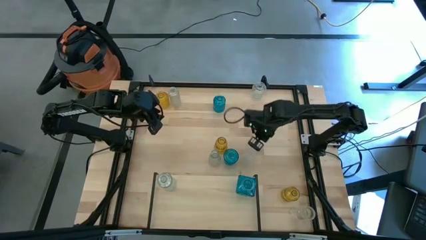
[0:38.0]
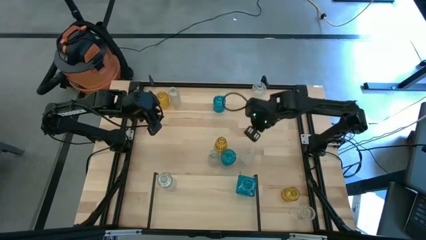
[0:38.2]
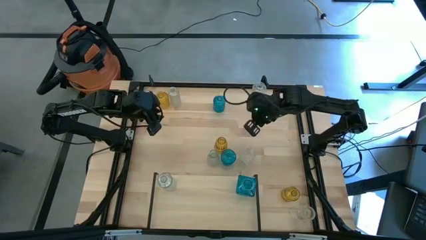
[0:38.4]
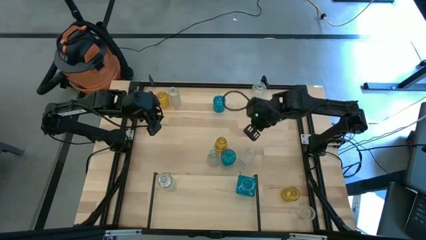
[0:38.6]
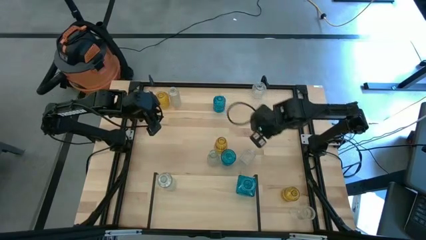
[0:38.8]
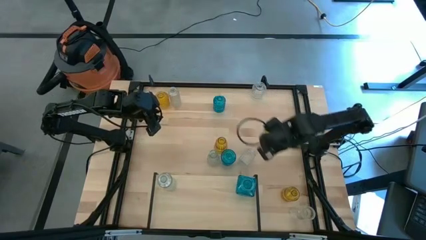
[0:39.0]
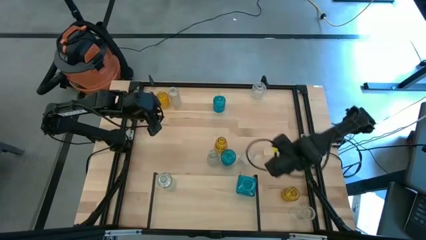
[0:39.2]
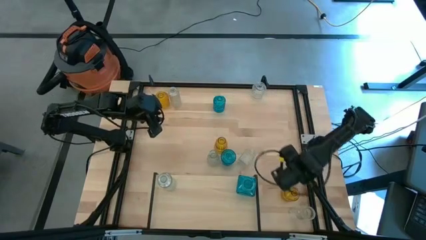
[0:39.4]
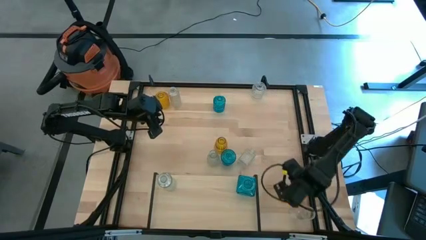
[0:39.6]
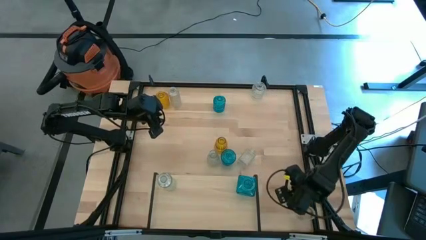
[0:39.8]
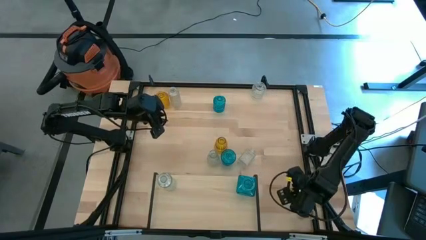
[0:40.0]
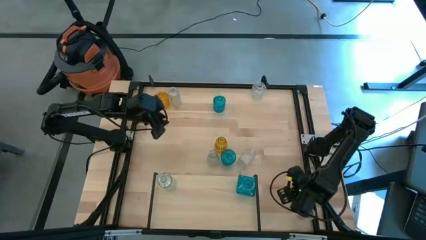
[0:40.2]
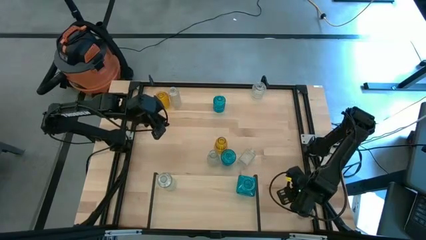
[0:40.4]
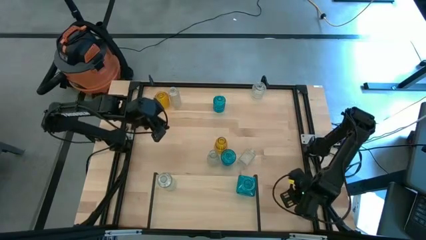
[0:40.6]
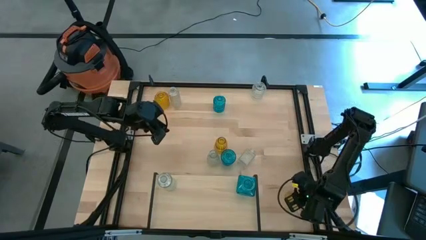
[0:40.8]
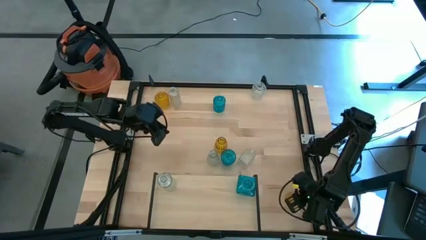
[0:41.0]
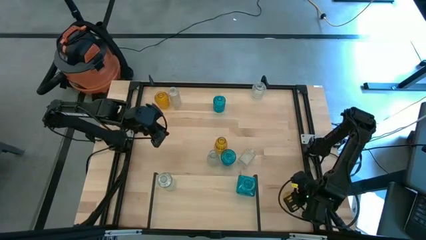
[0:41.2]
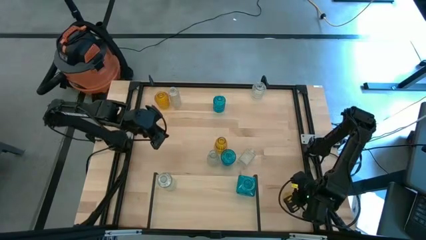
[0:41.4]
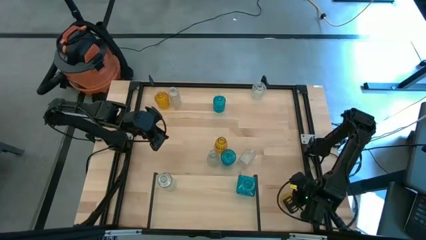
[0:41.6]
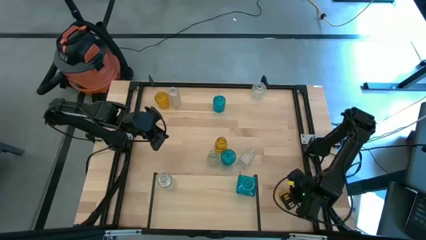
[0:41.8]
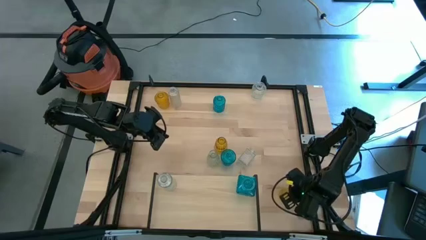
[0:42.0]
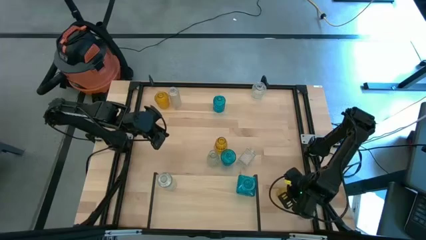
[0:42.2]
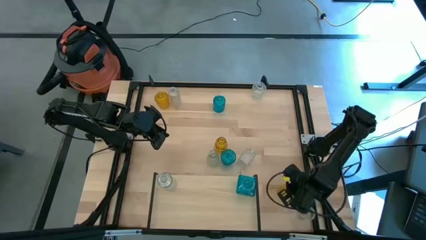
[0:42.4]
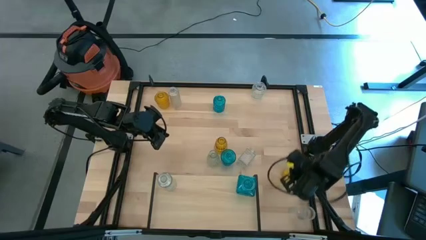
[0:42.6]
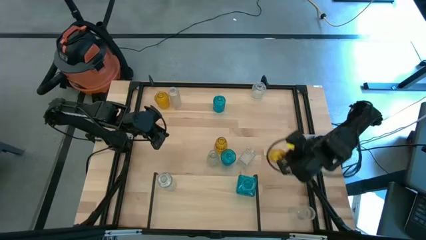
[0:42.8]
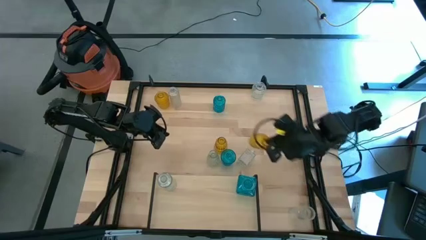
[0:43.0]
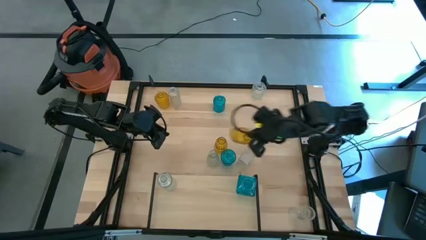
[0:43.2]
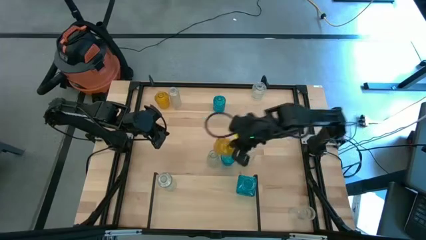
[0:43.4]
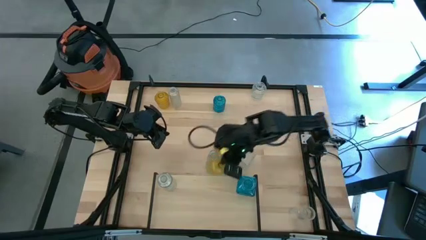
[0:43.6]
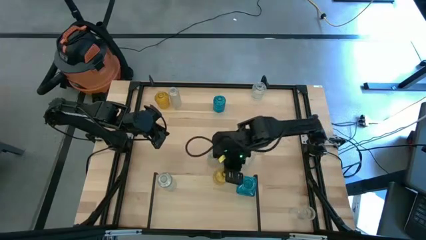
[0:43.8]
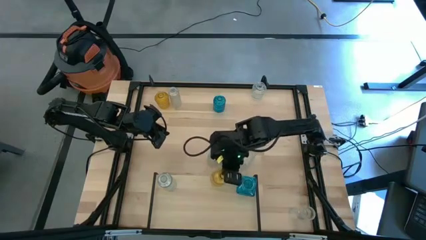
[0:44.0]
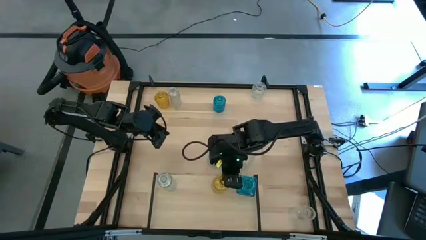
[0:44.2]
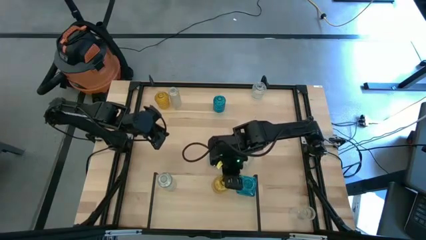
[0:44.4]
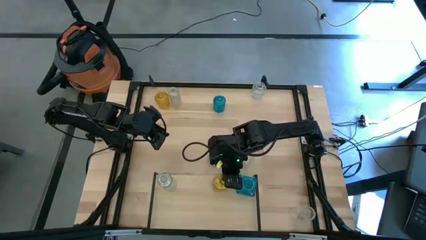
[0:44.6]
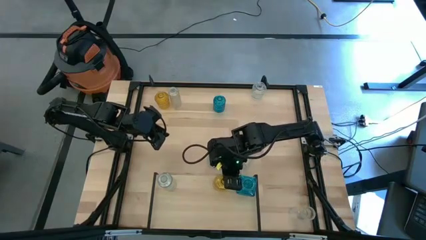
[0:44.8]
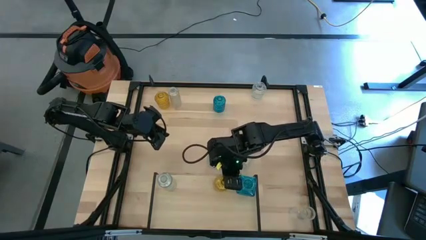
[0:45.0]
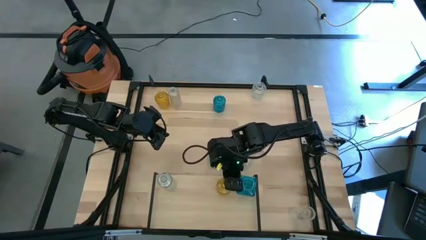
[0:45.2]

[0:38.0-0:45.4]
Task: sort vases onto shelf
Put the yellow vase on the shelf

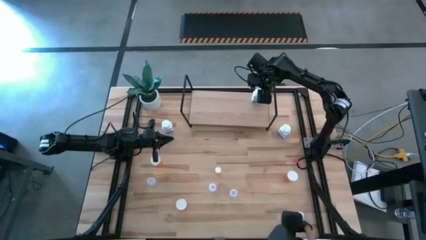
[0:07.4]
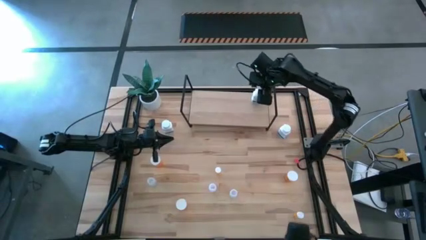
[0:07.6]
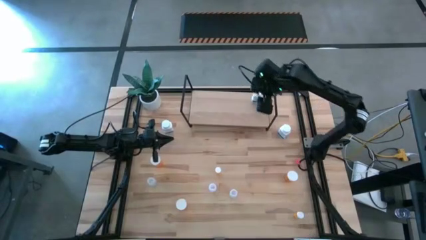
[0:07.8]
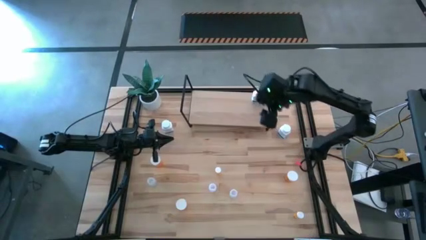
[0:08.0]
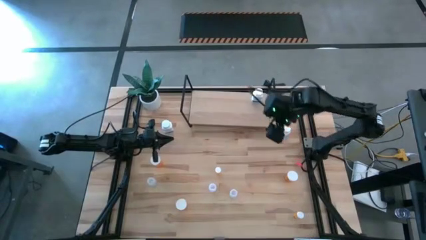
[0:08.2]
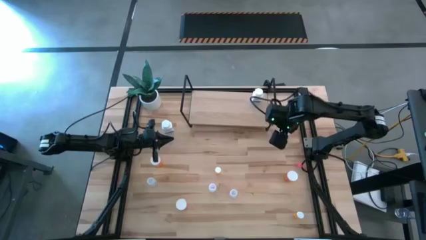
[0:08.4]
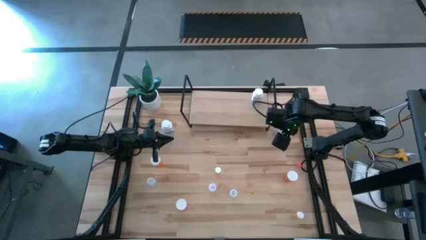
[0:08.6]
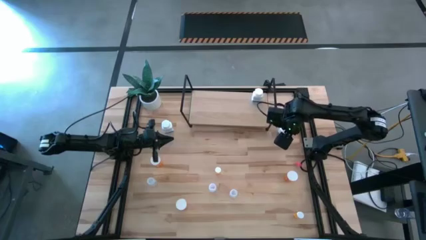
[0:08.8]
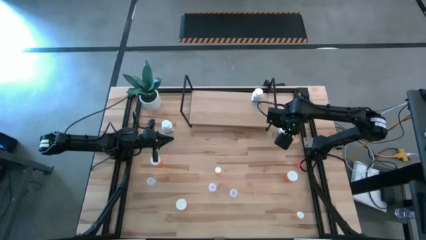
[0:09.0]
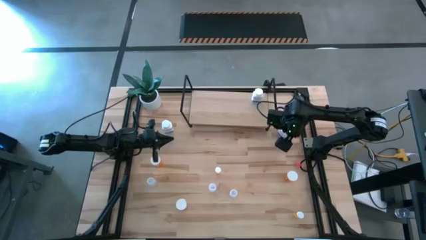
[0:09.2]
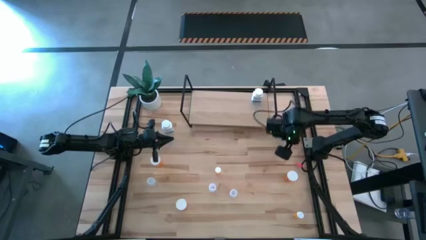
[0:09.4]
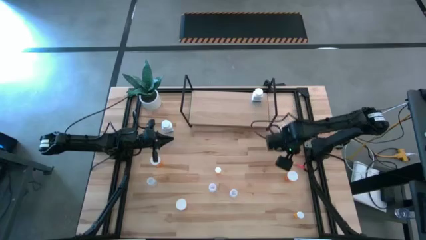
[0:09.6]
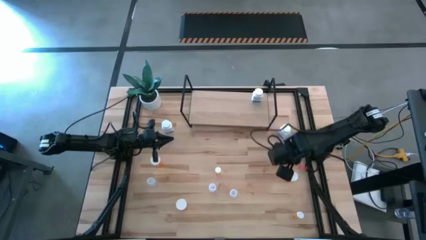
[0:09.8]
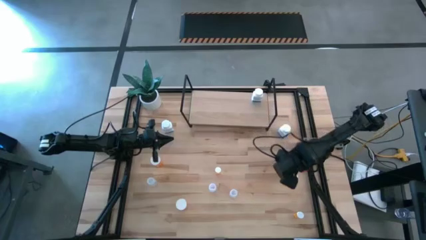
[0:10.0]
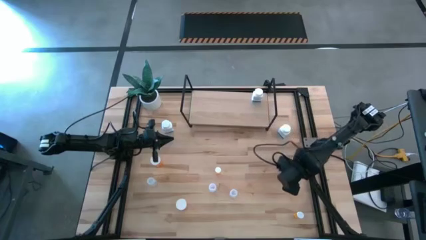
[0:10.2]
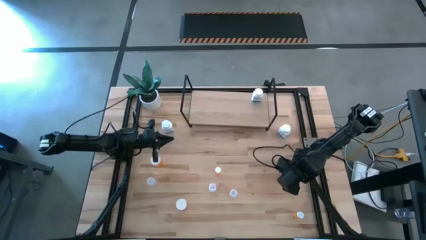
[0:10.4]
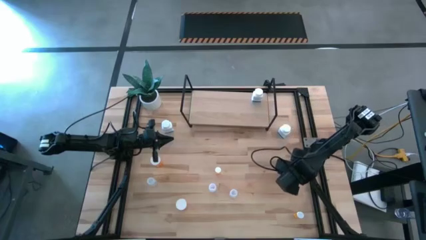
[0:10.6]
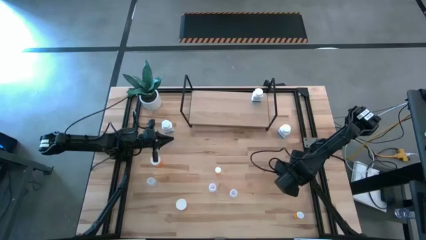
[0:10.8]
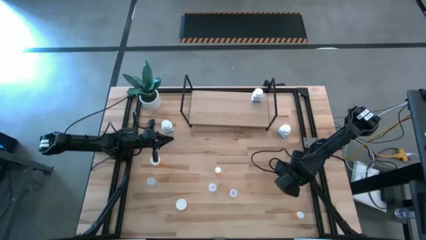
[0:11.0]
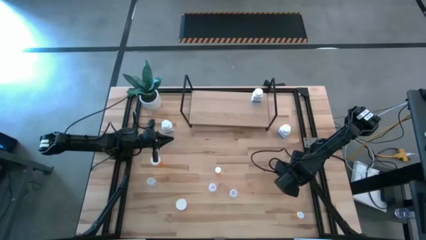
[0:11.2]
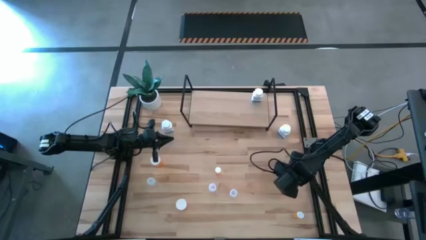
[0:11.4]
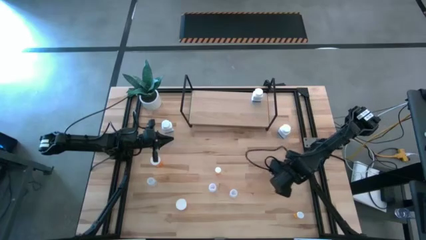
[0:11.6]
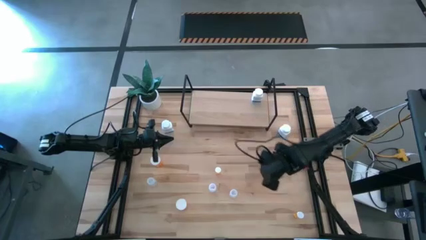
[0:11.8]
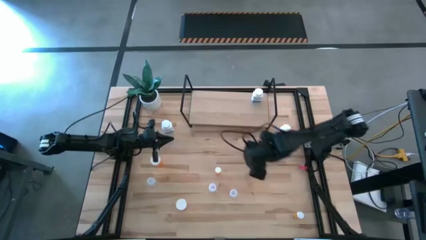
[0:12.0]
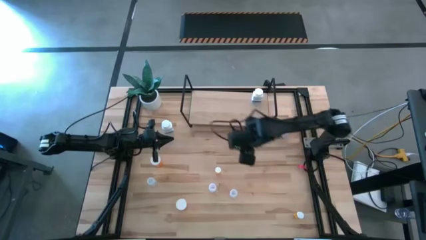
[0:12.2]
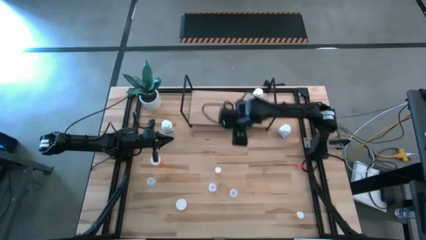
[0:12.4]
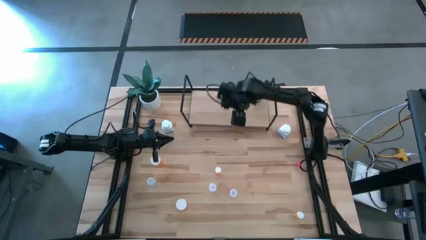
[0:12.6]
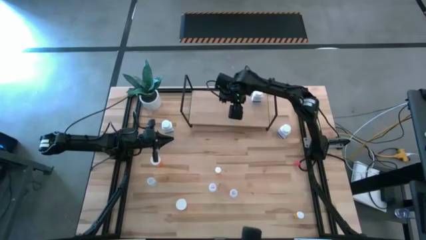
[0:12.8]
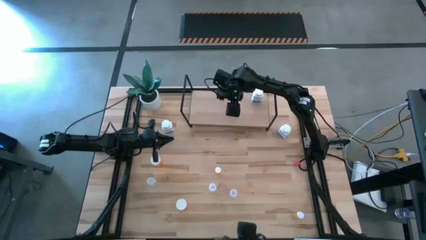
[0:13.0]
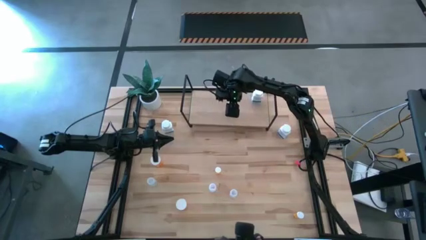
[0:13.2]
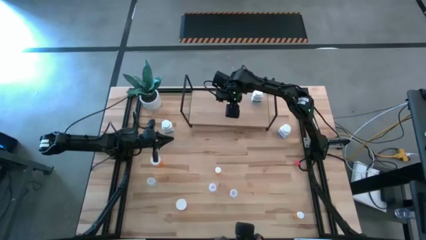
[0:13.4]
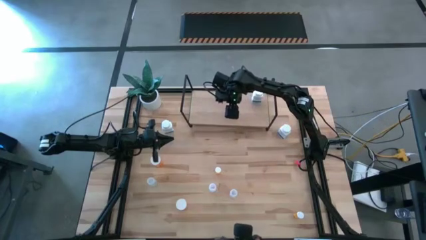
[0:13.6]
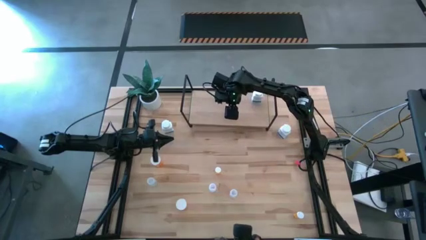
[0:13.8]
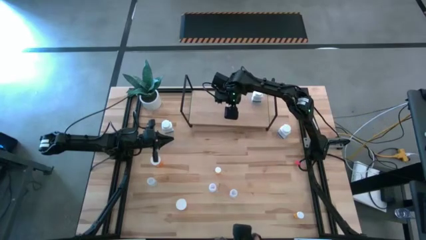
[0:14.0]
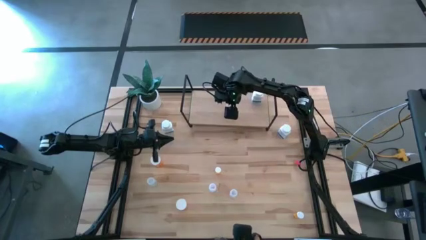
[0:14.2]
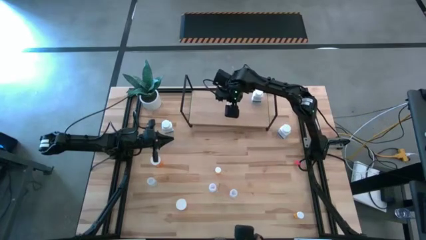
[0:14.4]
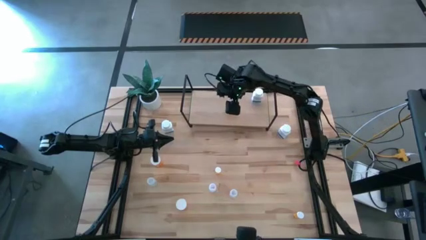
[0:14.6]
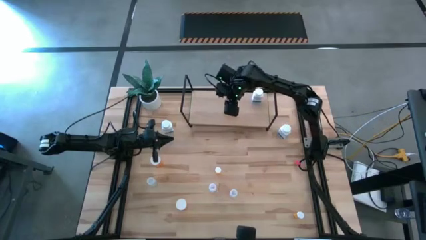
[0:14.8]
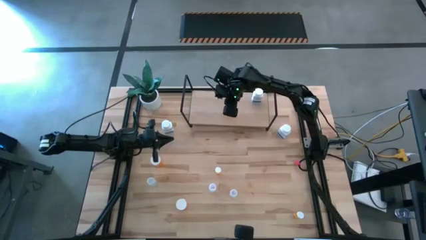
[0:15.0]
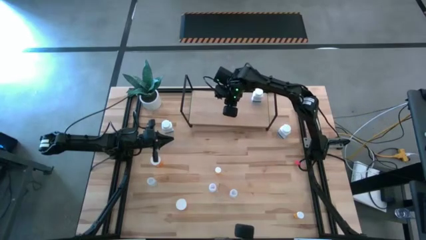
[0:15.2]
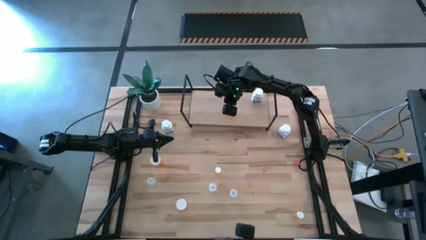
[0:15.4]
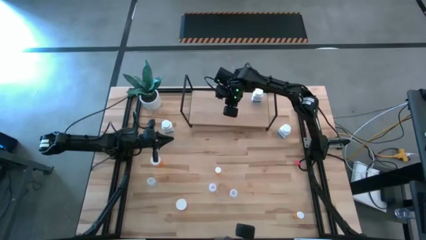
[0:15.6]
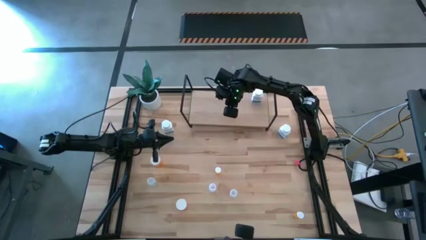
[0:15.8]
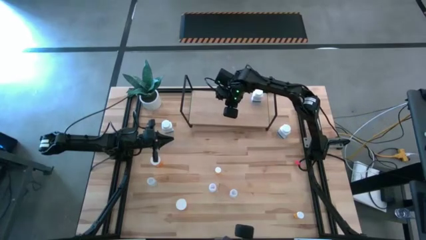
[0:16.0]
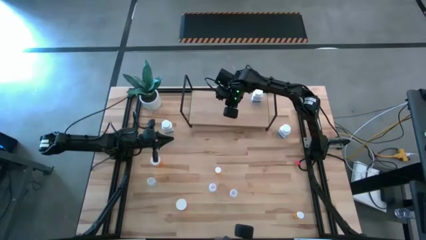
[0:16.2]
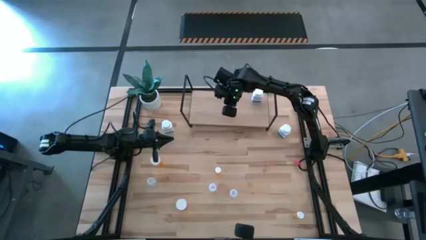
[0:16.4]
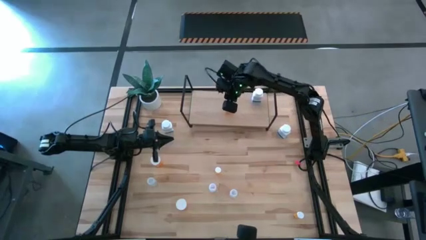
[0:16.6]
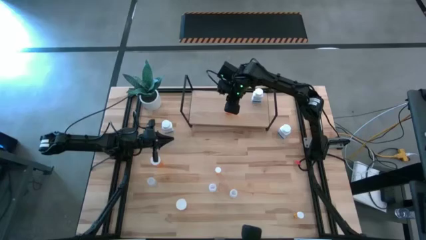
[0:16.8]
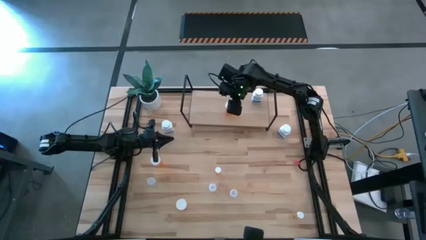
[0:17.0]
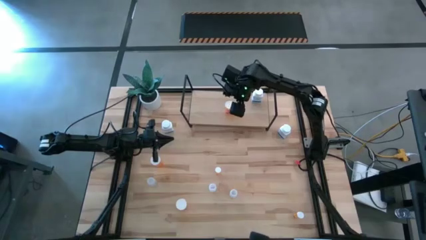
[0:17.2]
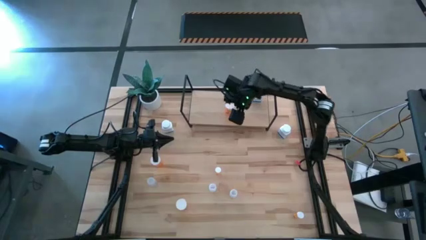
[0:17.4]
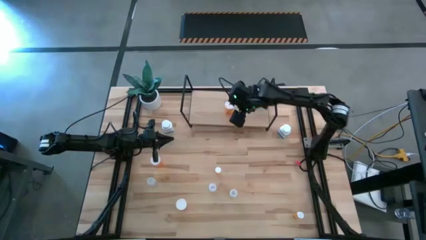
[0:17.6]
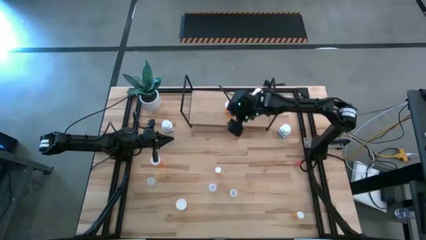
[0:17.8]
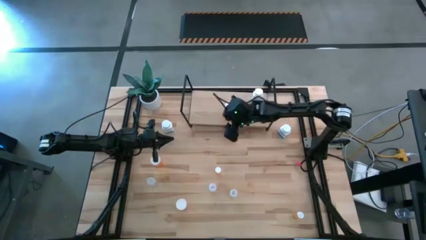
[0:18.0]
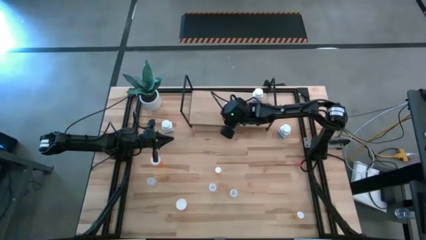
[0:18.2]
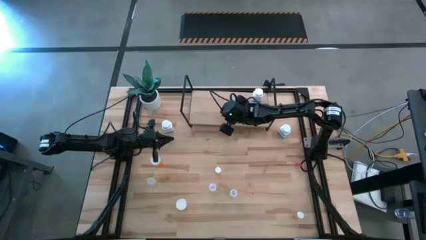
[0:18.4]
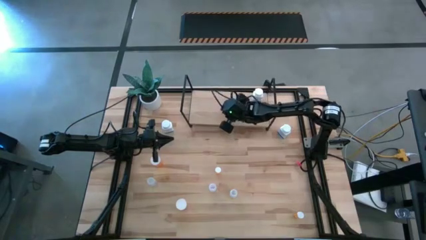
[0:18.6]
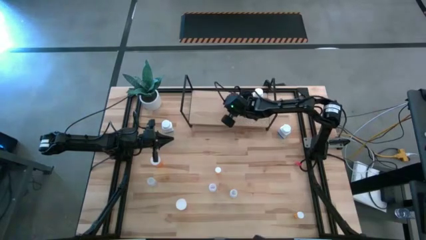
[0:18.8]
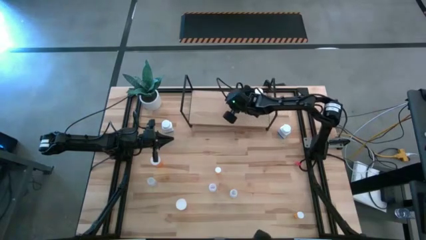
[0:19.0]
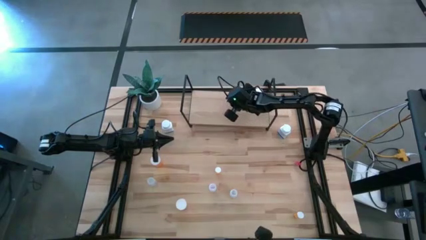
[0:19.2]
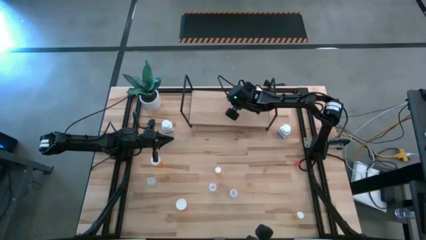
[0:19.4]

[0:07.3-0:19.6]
Task: Pick and place medicine bottles onto shelf by color
Put the middle large orange medicine bottle on the shelf
